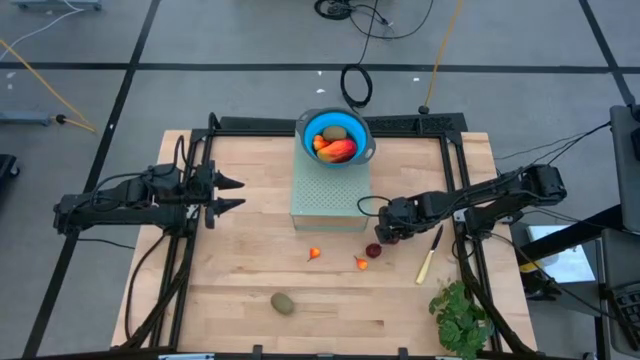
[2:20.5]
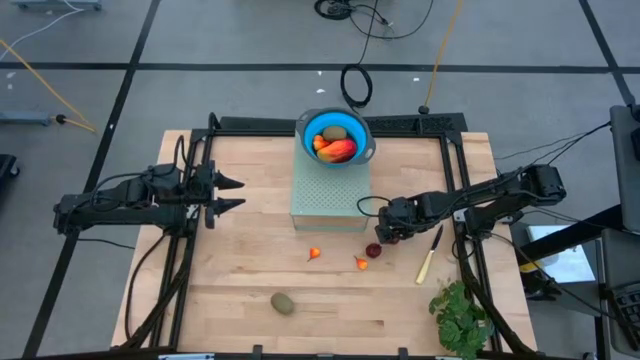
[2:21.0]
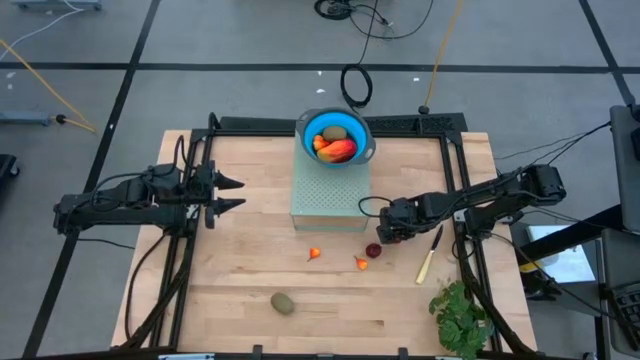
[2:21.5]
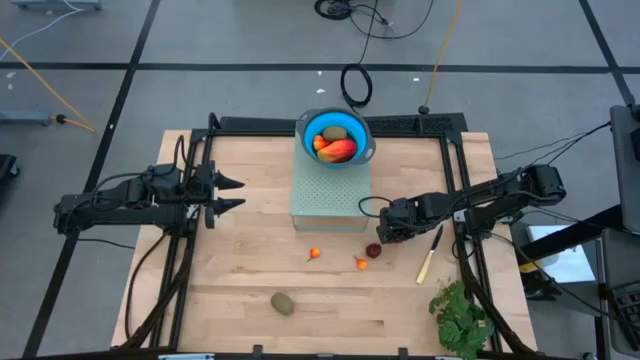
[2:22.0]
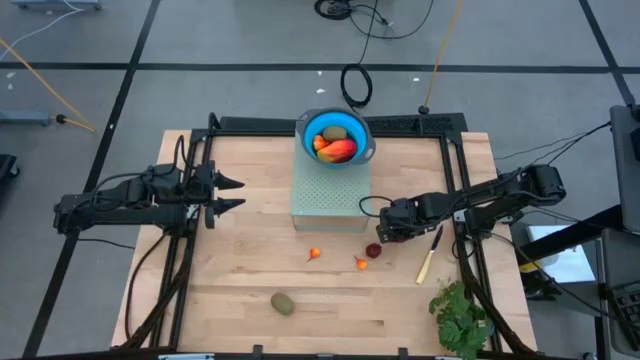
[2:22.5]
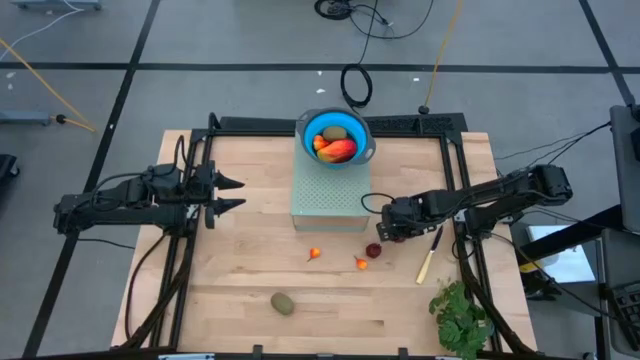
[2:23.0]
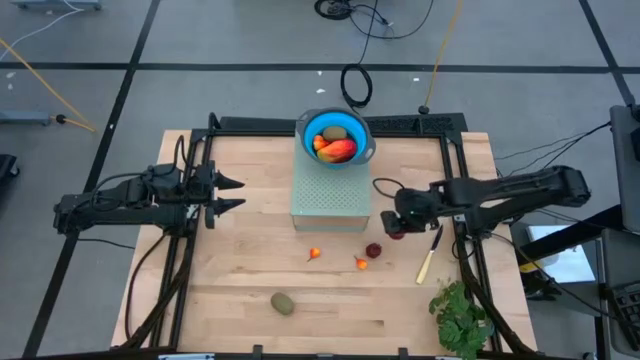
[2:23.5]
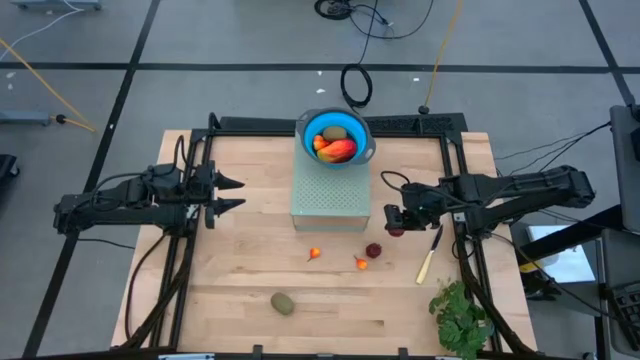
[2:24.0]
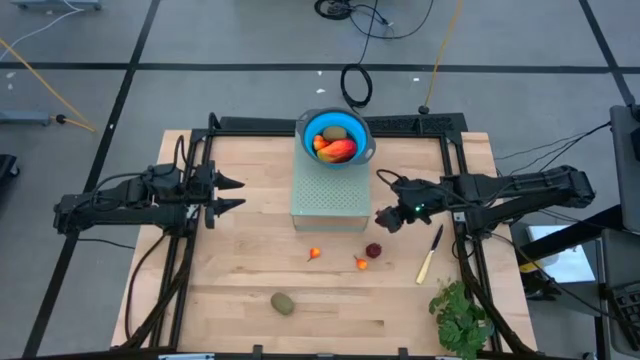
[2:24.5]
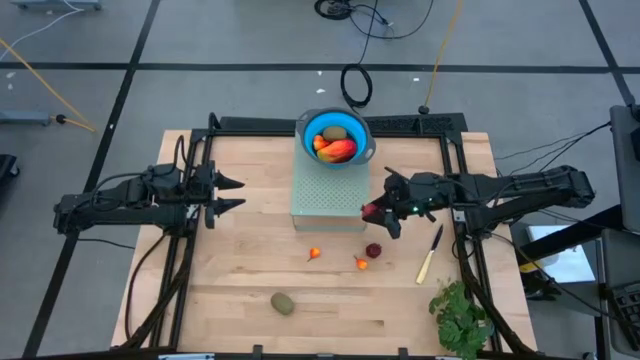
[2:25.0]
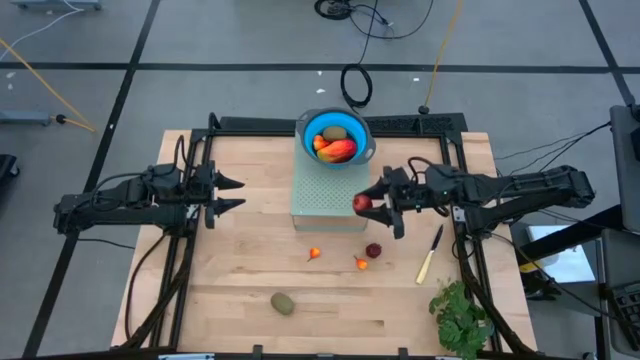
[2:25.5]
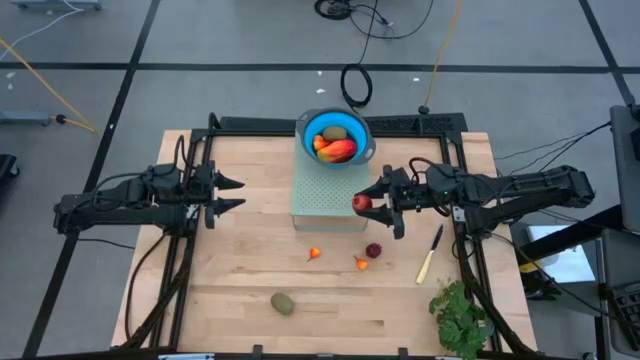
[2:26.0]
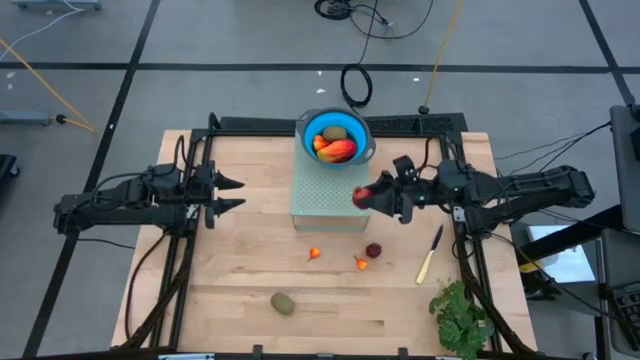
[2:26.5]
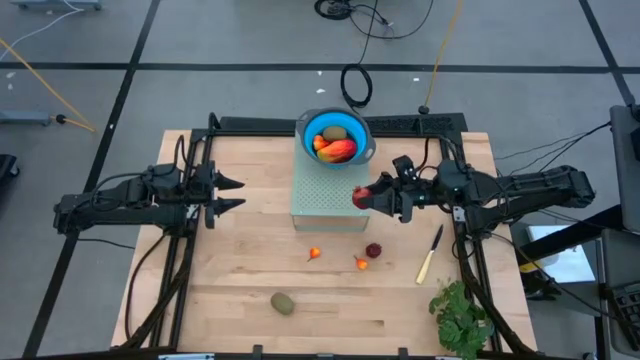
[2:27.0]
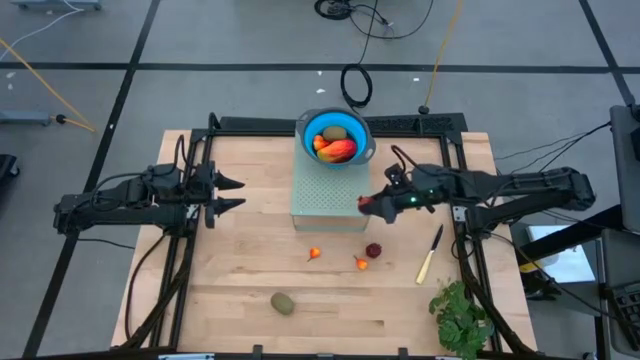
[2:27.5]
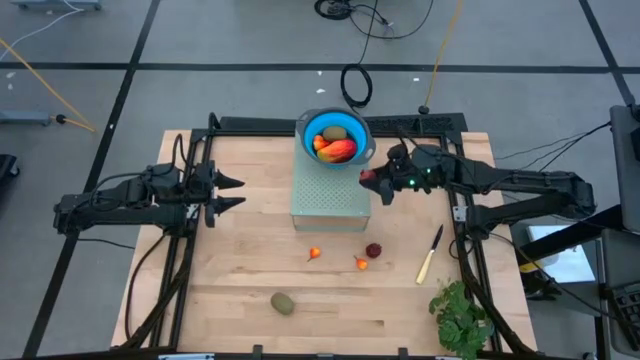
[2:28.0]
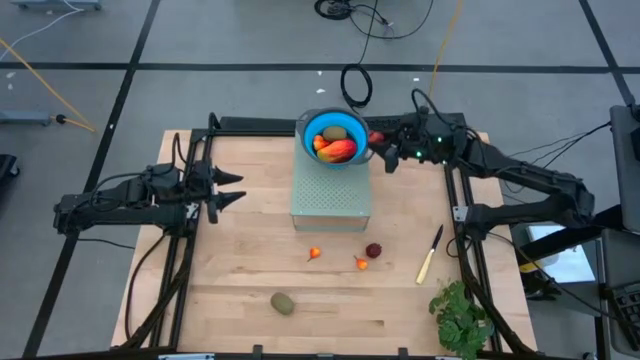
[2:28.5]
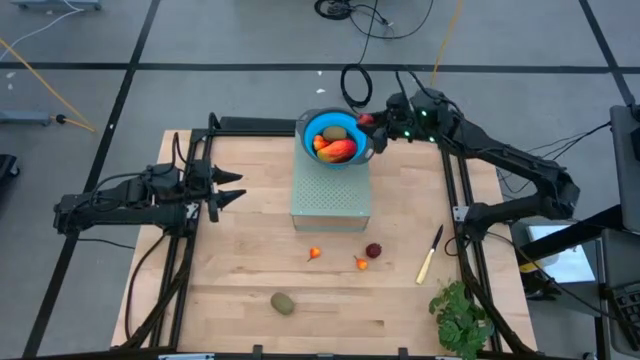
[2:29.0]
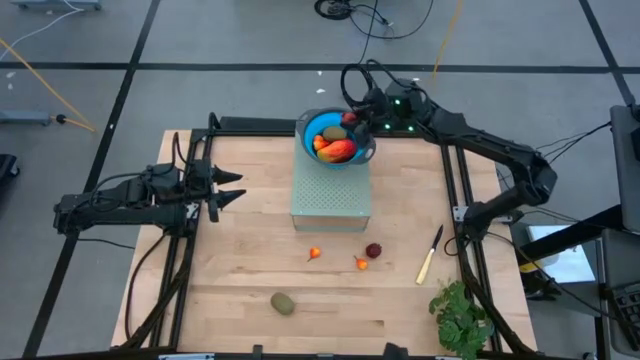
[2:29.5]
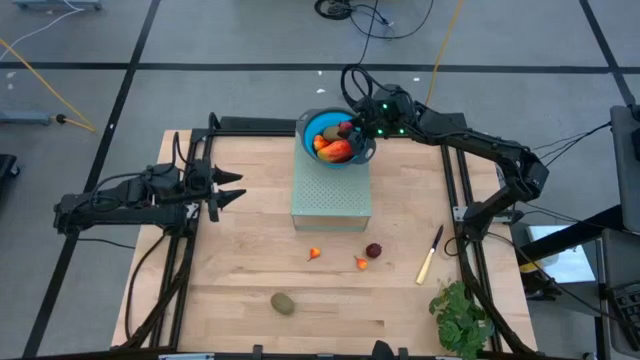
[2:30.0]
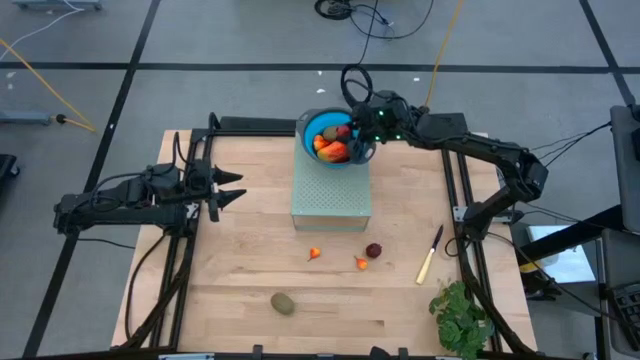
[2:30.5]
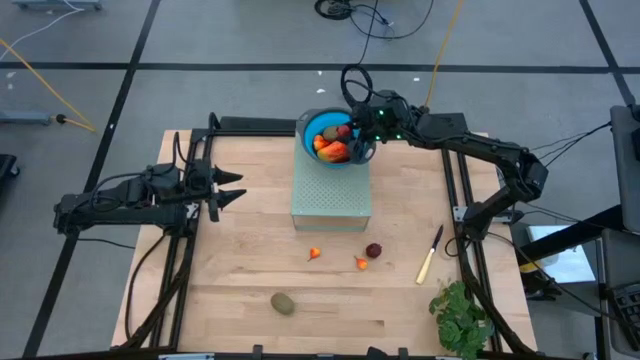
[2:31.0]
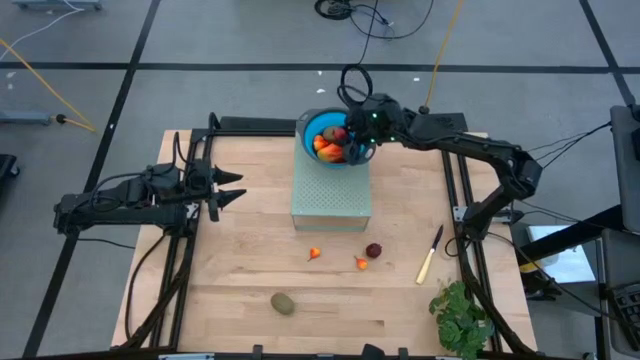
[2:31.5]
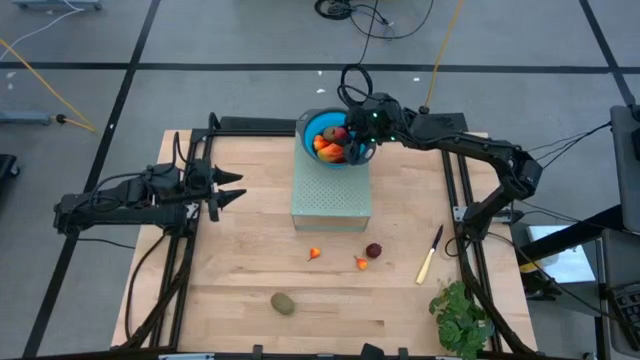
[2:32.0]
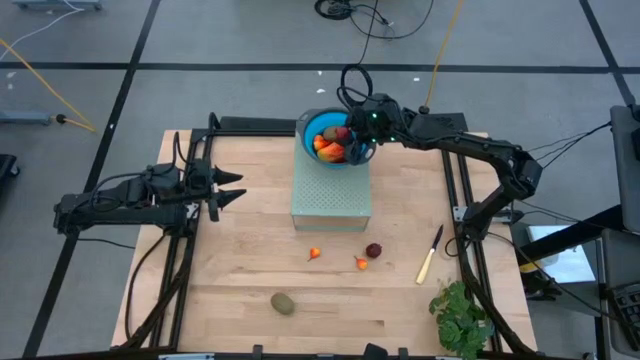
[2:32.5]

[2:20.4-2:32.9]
Task: Pick & Place Fruit
Put the pomegranate into the blue strainer bowl on the shelf

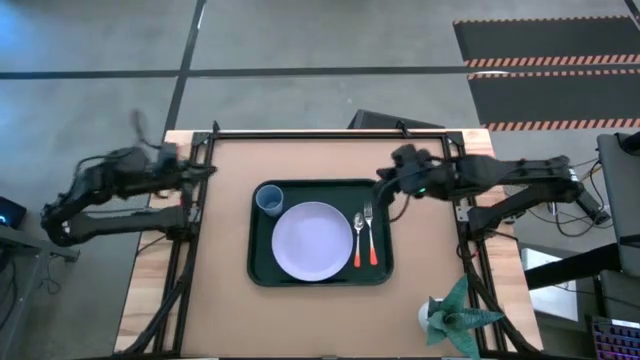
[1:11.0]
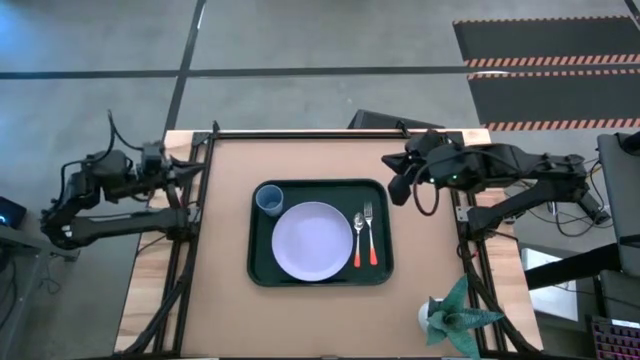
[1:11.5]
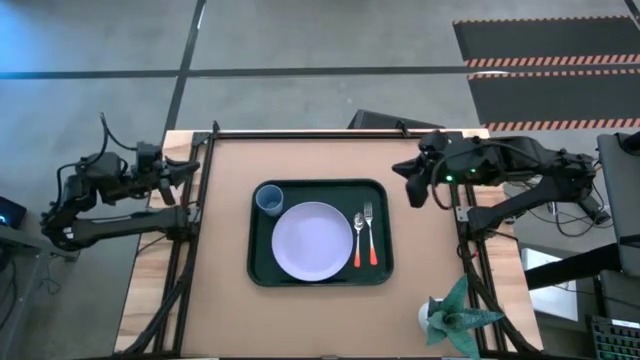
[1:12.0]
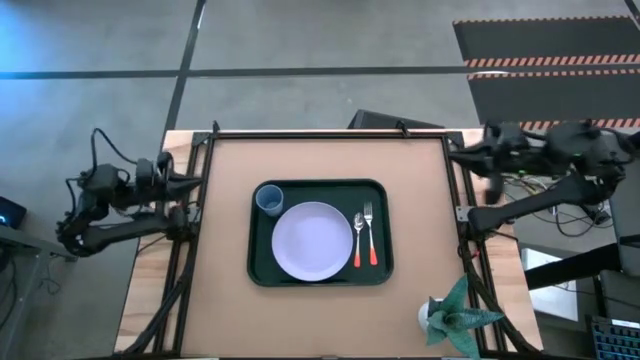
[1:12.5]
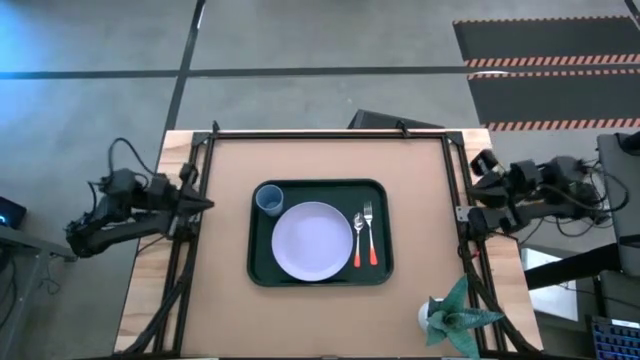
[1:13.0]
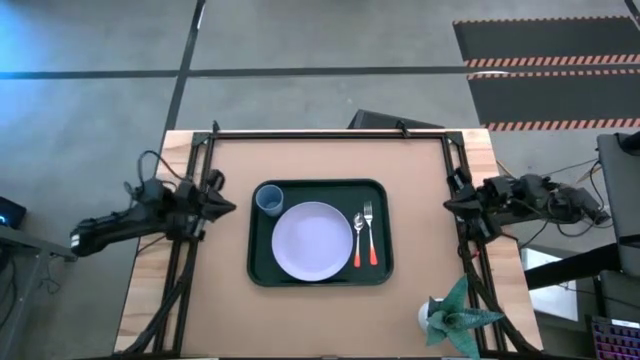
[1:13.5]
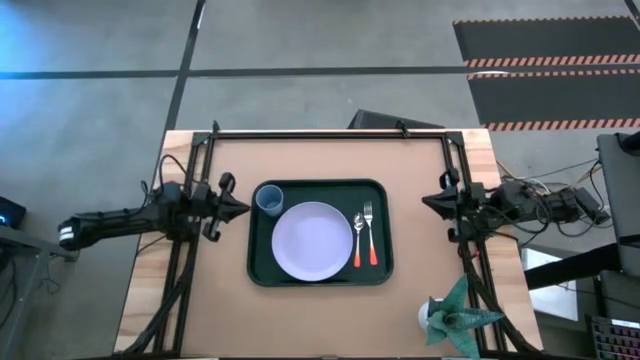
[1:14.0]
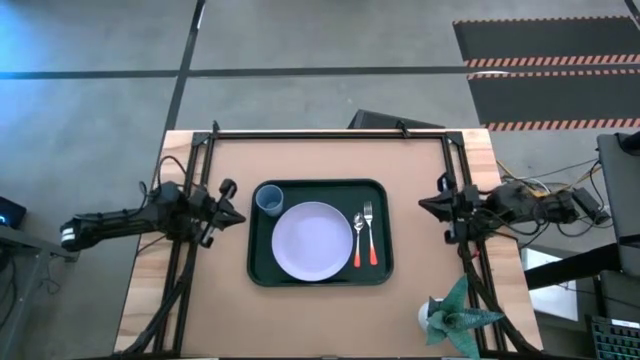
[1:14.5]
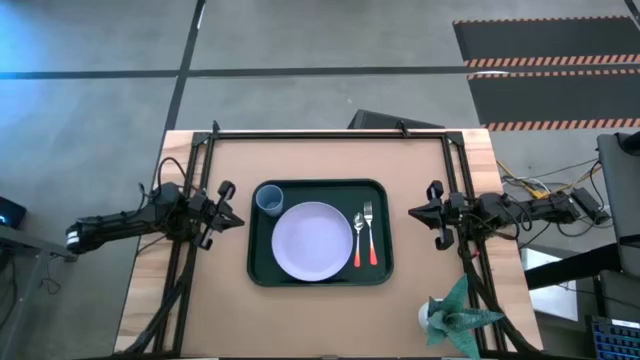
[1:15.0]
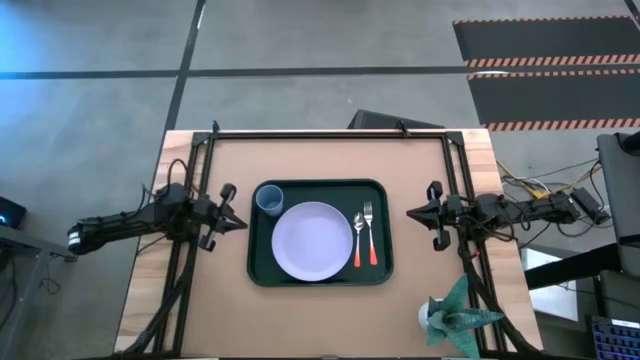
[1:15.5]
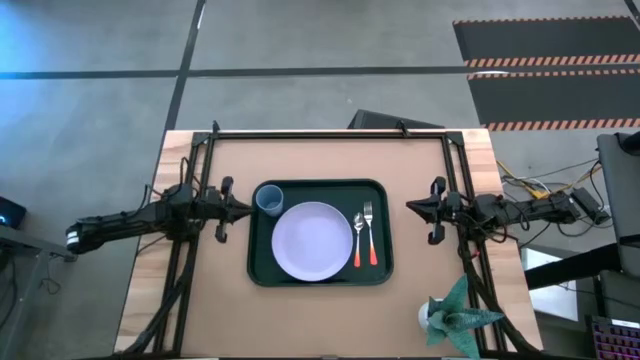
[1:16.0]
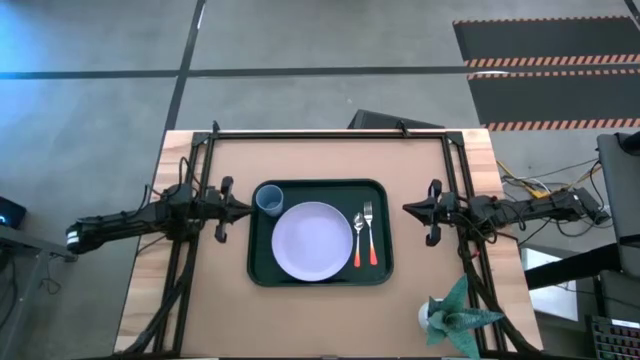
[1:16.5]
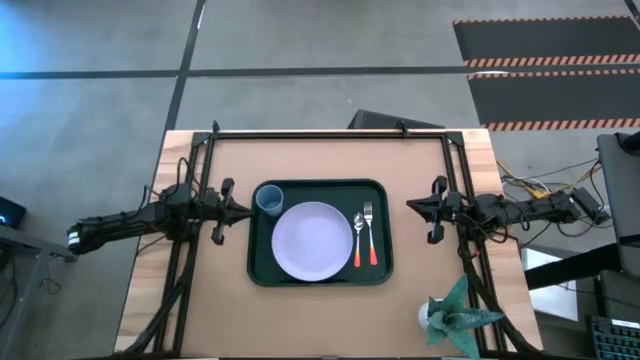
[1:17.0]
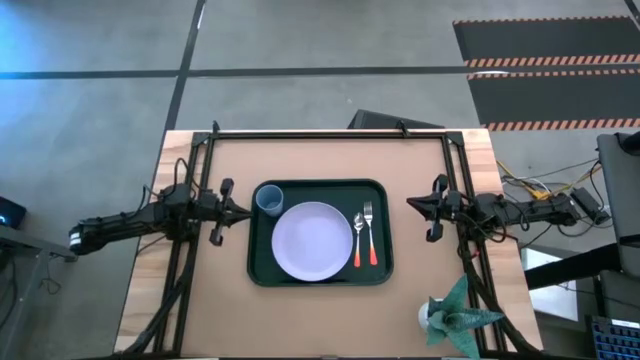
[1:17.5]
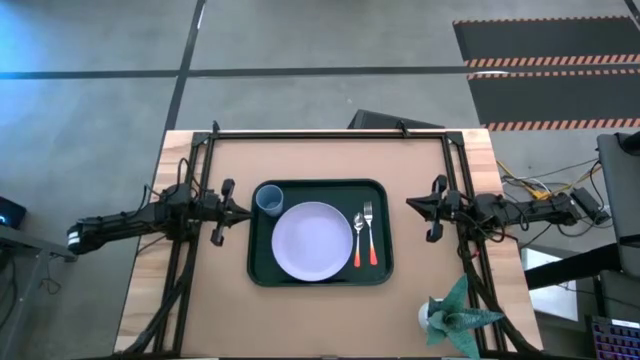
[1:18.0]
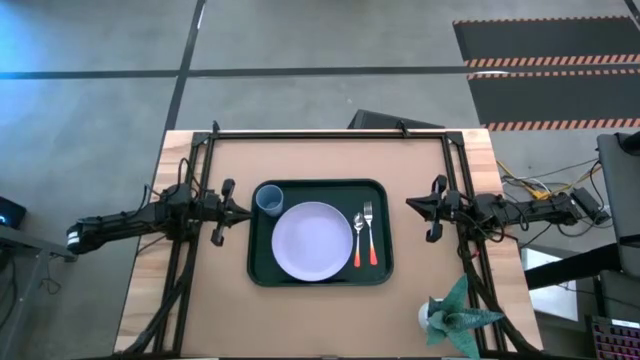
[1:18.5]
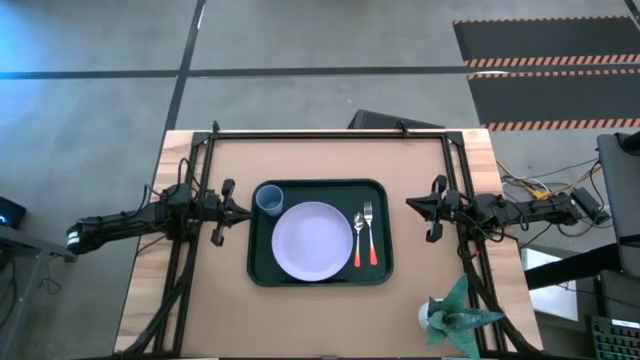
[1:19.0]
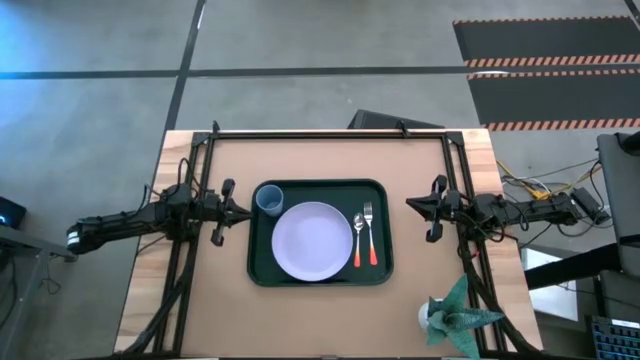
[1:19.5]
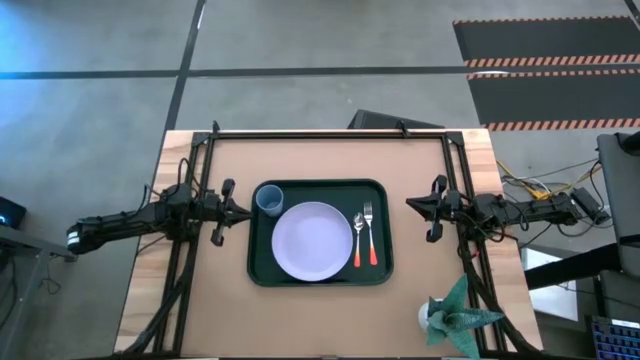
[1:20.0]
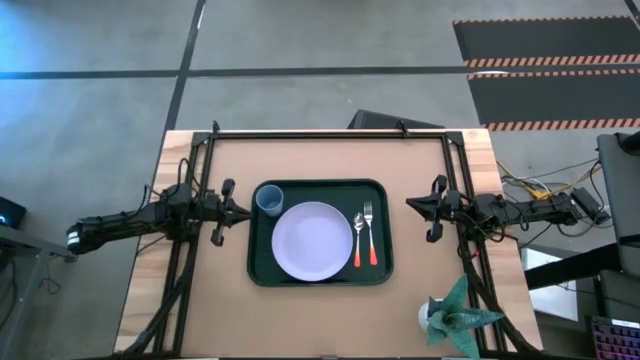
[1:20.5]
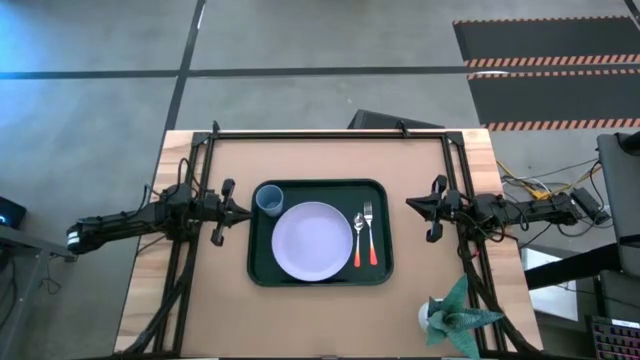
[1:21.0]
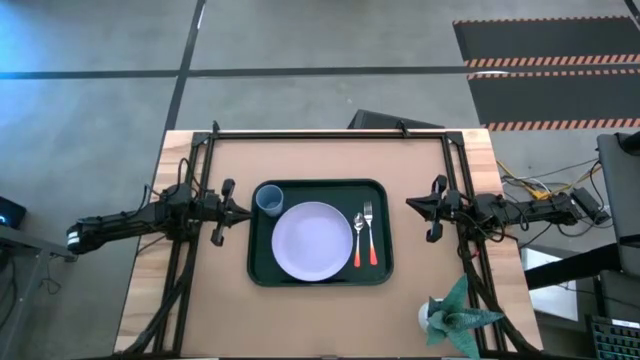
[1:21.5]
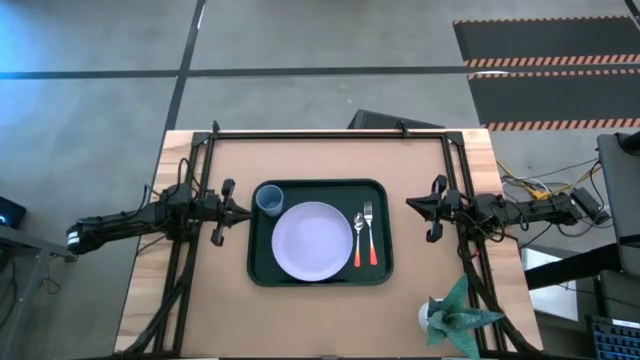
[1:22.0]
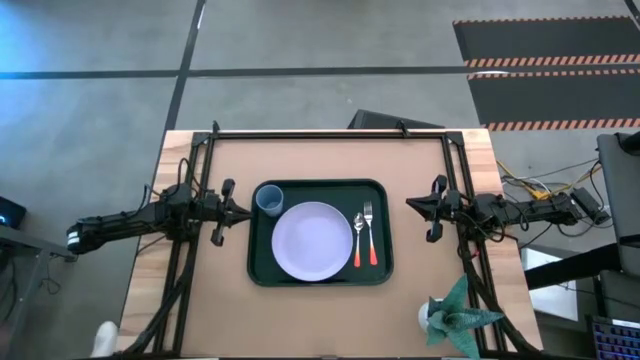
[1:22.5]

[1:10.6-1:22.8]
Task: Pick and place plate/cup/fork/spoon on tray
Return to Home Position
